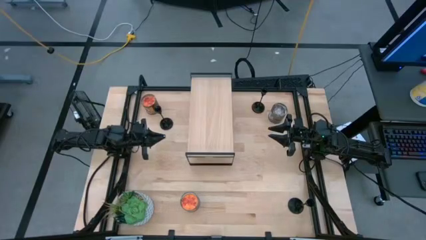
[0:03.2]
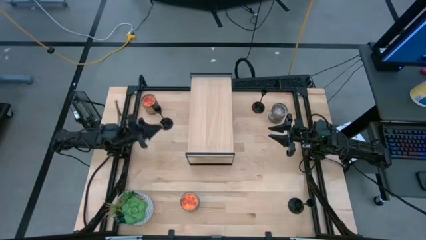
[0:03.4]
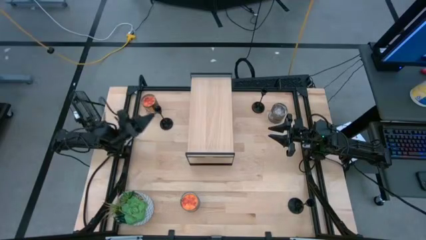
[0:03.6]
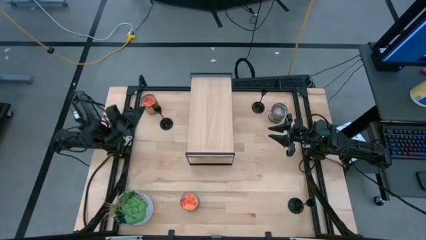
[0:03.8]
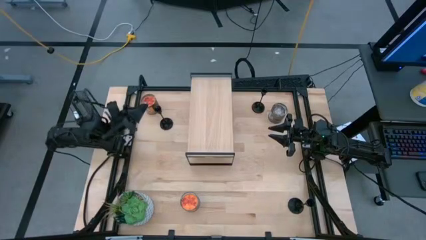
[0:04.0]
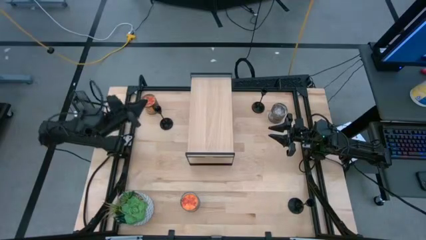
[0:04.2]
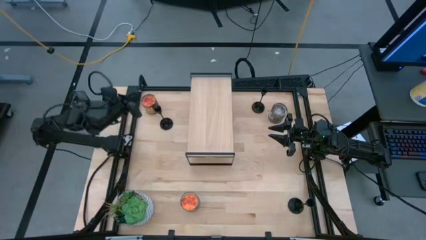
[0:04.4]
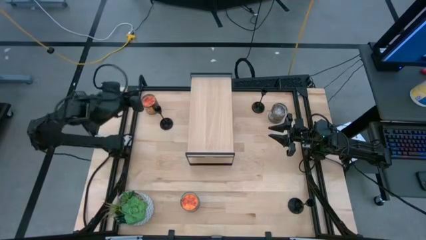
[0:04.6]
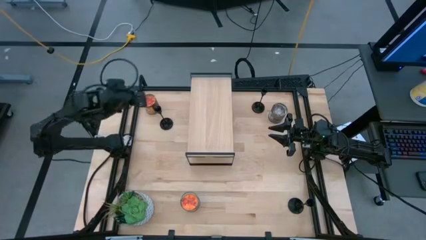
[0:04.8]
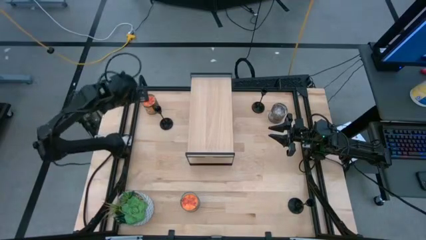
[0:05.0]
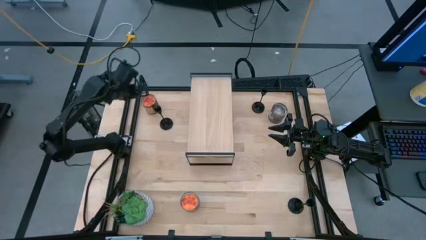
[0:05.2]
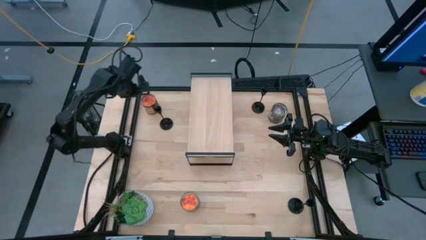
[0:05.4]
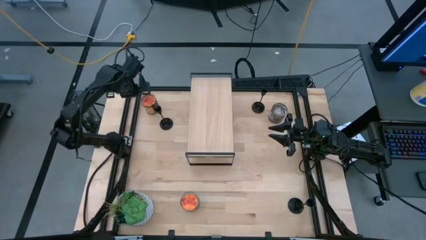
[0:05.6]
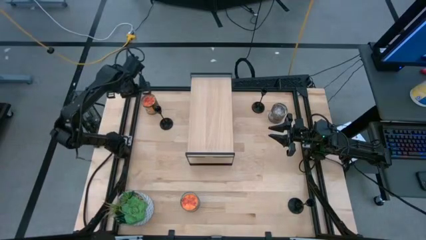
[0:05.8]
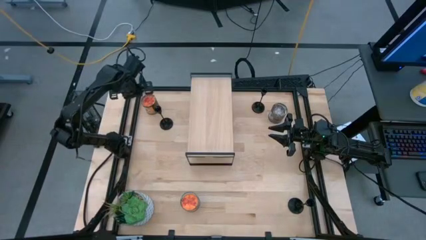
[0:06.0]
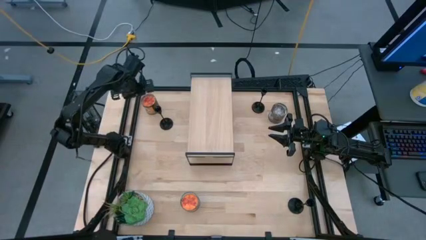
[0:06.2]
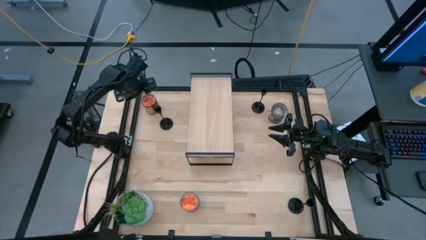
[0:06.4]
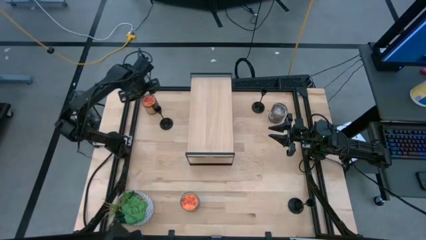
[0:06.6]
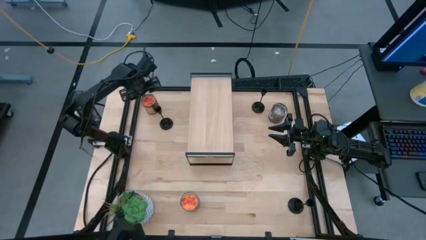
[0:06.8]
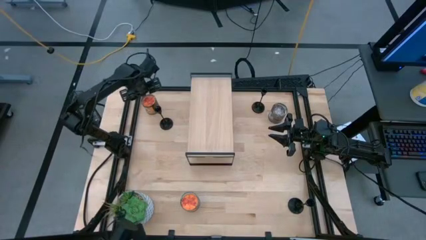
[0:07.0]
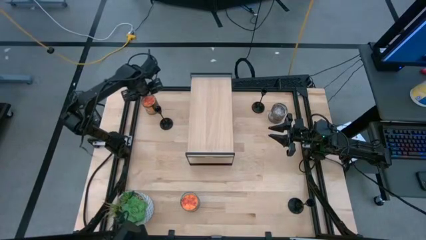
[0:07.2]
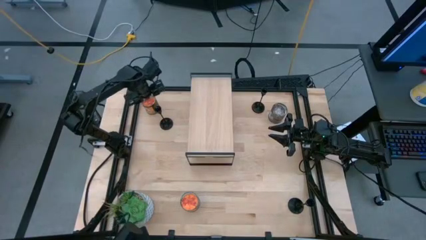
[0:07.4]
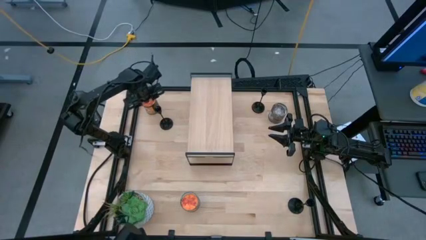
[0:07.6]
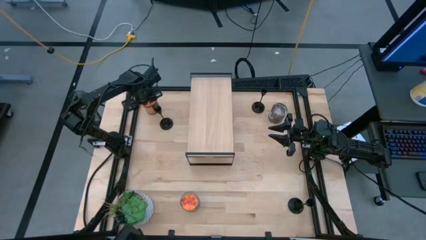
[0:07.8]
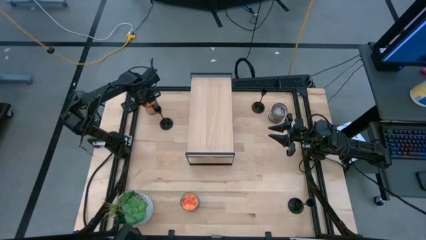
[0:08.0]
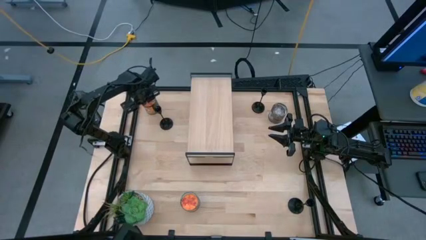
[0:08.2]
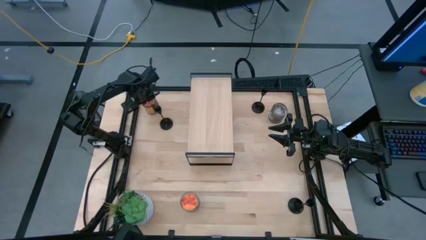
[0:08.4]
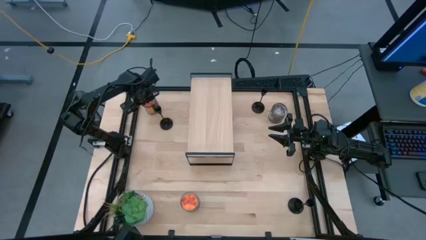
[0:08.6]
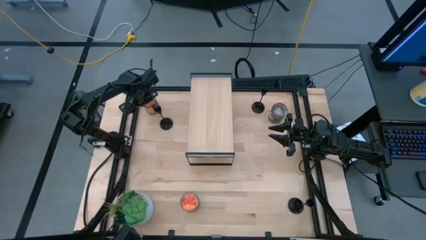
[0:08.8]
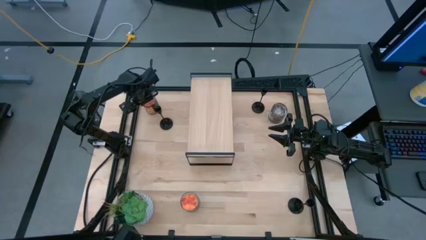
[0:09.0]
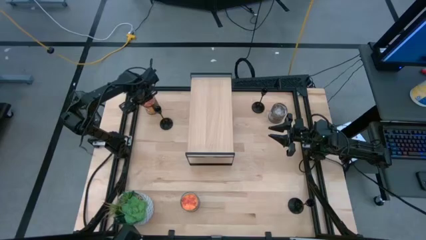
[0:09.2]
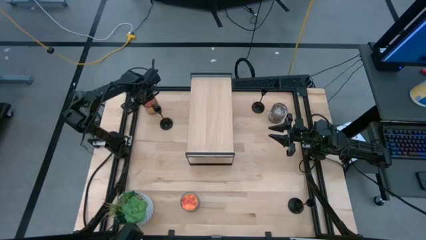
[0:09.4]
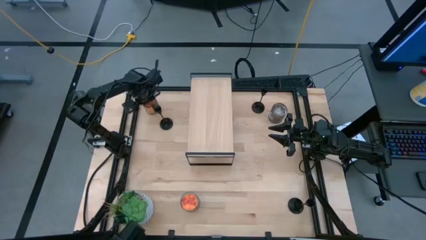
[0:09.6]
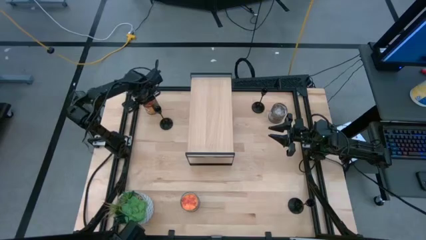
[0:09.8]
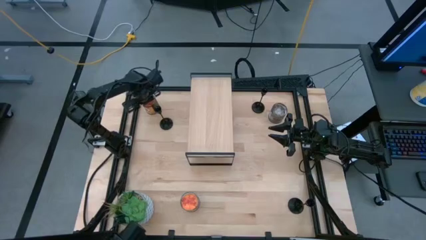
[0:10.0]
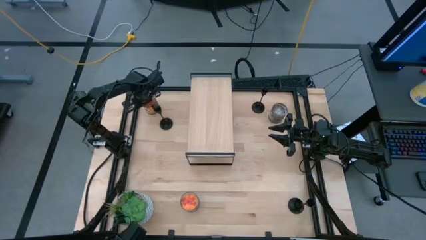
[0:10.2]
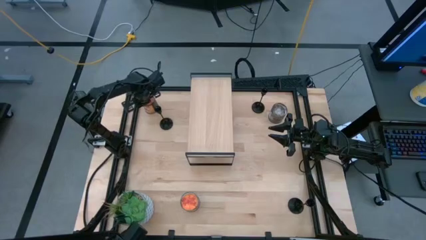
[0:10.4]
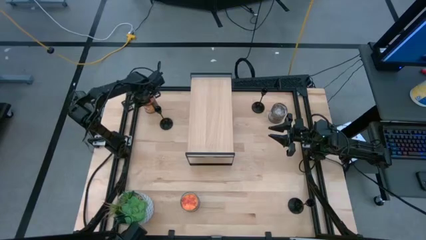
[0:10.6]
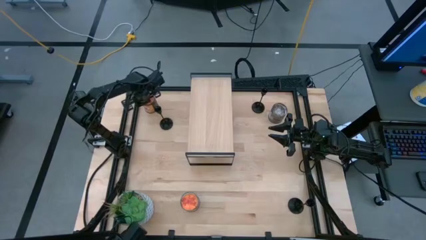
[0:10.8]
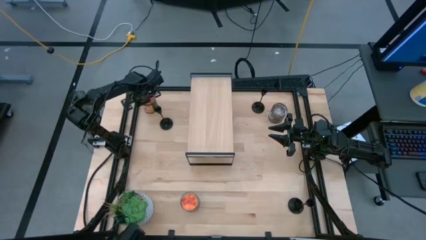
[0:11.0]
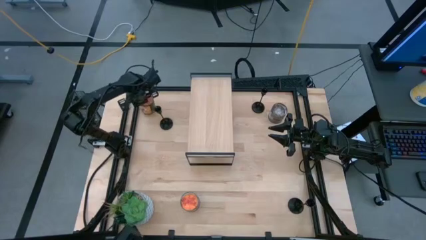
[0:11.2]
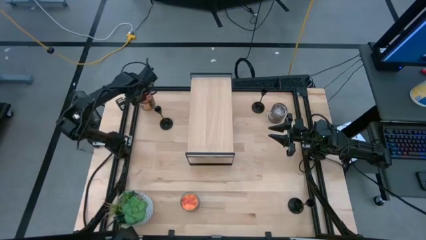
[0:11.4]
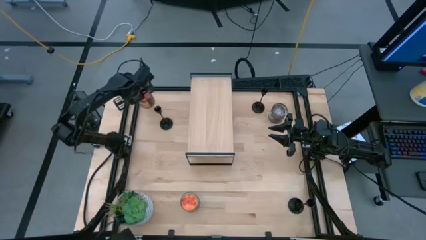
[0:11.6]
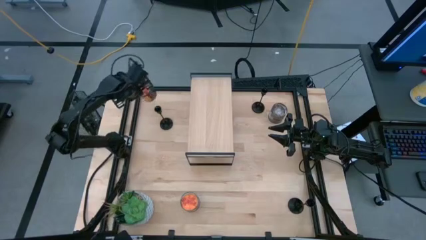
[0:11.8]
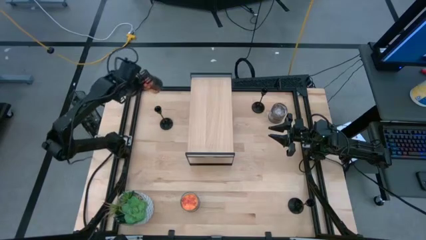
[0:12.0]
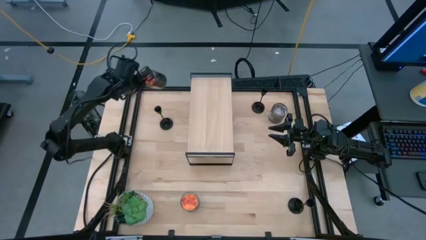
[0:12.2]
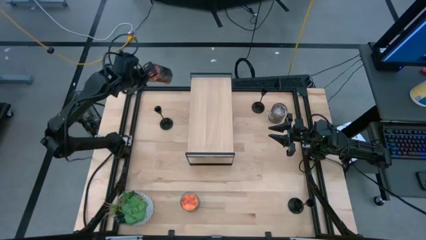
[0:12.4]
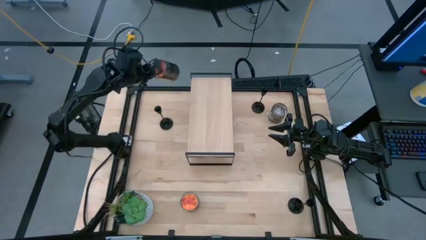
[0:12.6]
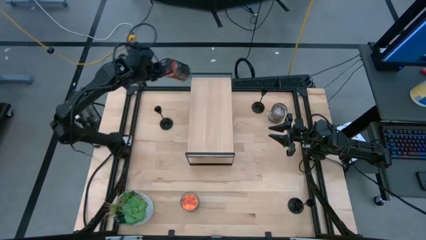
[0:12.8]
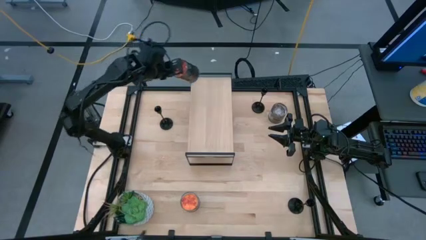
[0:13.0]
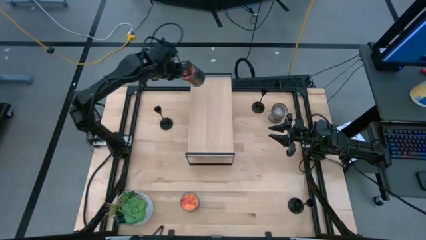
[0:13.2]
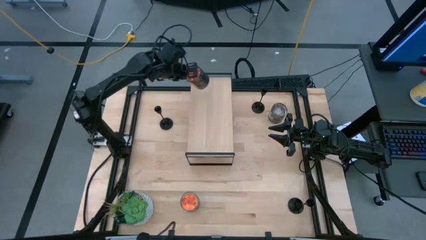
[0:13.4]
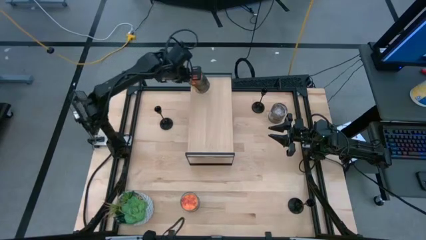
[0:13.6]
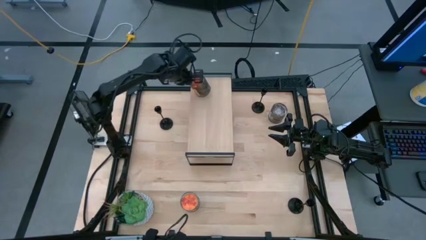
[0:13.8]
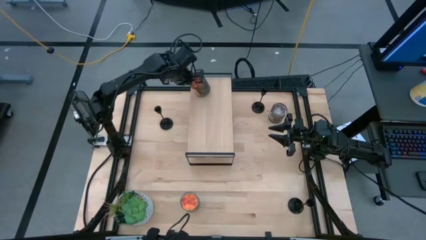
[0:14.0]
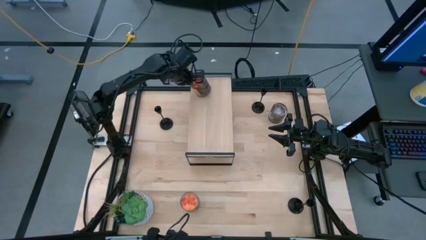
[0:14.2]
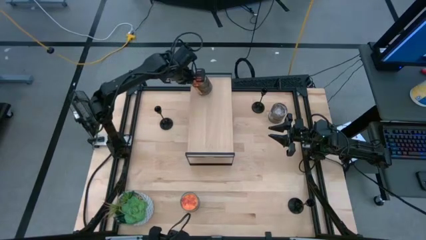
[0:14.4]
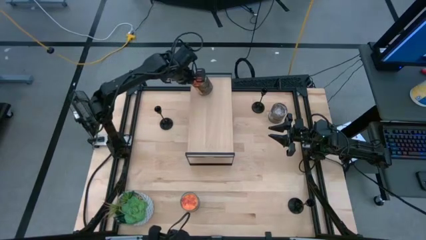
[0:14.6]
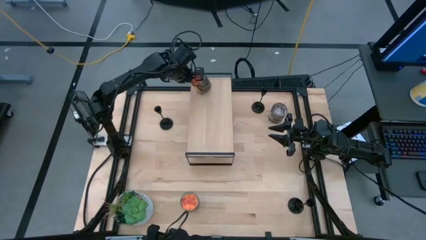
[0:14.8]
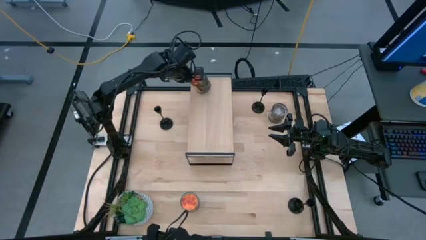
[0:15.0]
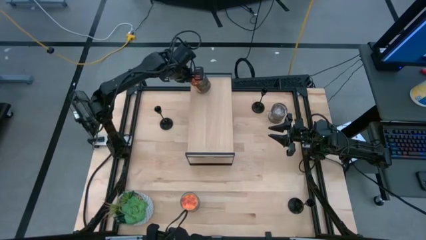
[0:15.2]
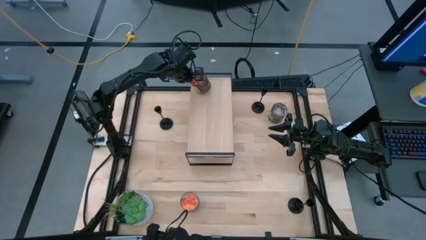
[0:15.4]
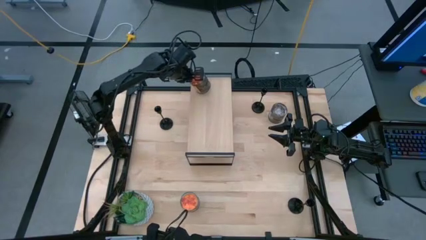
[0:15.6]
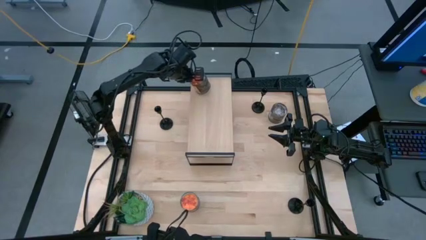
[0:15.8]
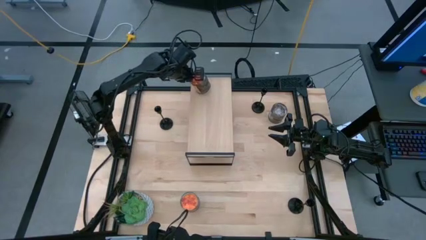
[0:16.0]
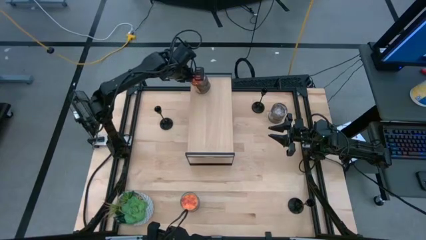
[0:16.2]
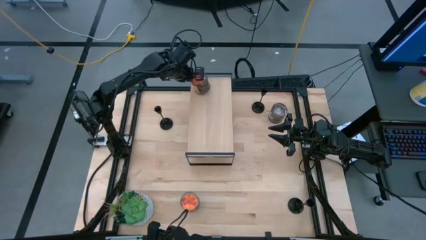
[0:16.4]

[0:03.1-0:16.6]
Task: Pick & Place candle stick holders
Put the top orange scented candle on the shelf

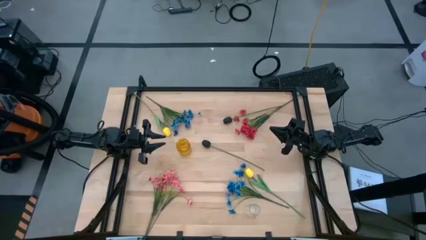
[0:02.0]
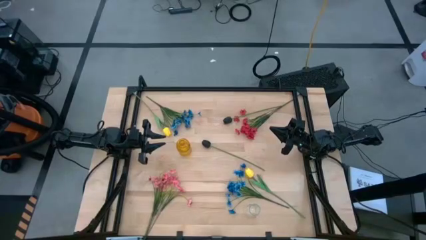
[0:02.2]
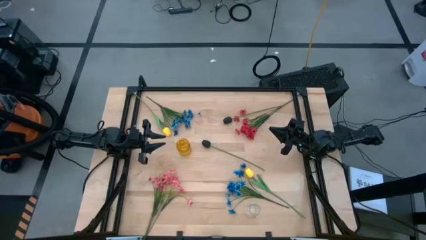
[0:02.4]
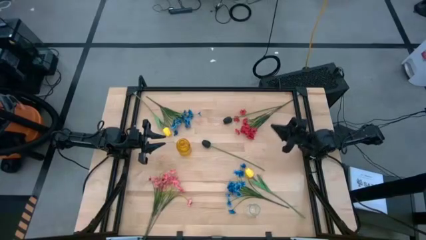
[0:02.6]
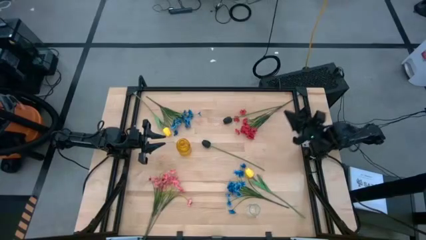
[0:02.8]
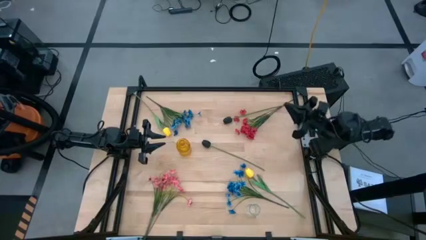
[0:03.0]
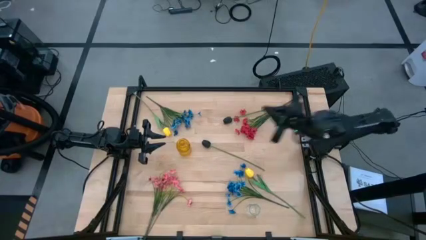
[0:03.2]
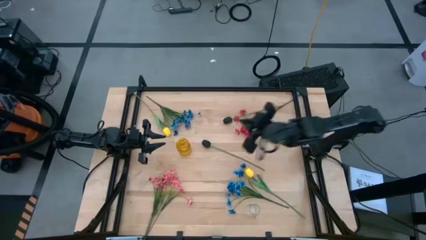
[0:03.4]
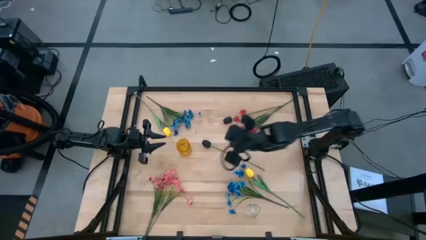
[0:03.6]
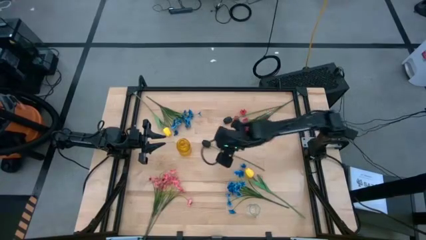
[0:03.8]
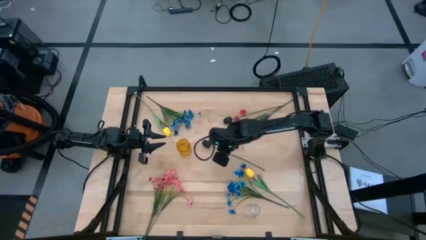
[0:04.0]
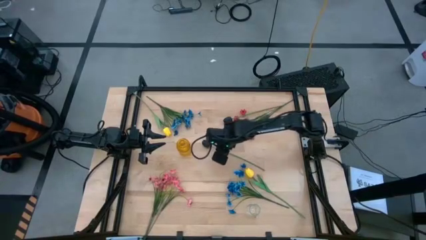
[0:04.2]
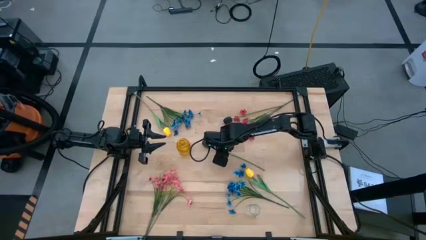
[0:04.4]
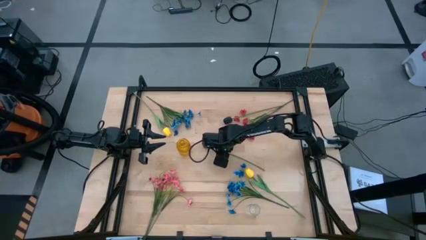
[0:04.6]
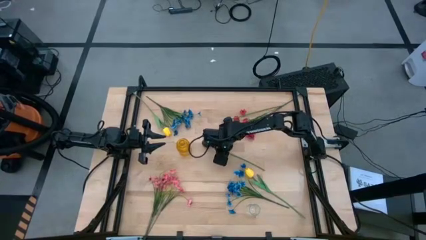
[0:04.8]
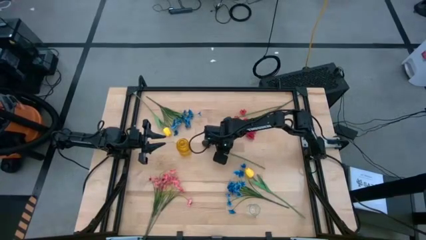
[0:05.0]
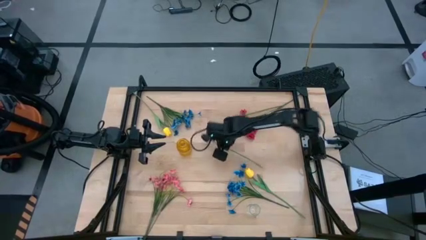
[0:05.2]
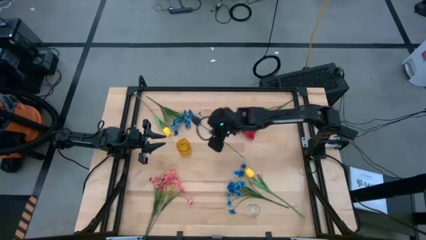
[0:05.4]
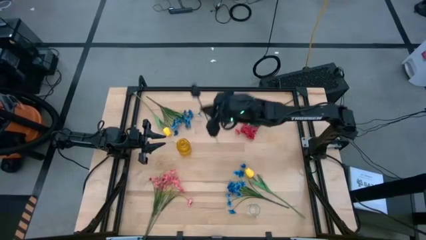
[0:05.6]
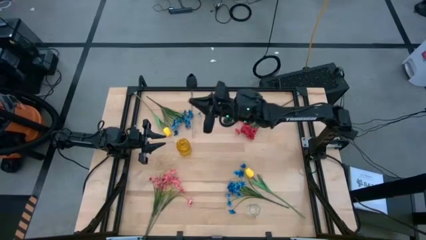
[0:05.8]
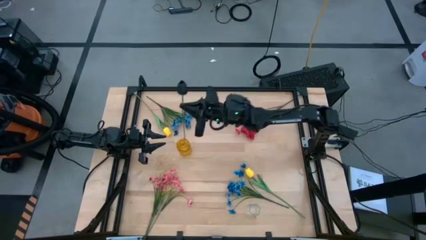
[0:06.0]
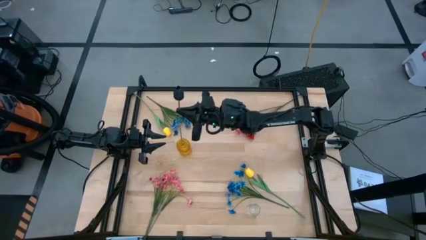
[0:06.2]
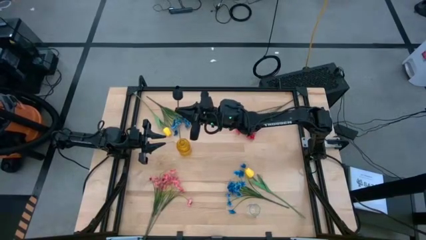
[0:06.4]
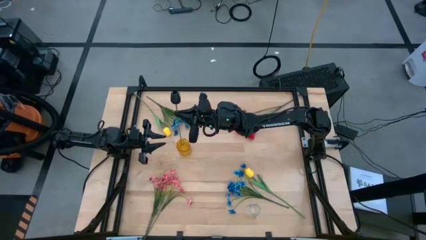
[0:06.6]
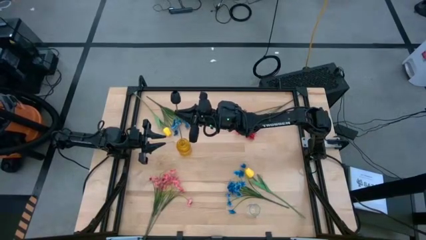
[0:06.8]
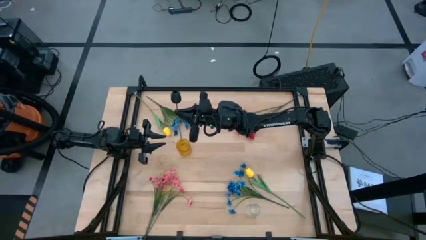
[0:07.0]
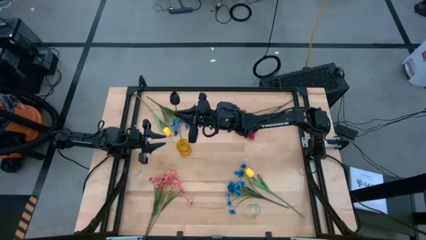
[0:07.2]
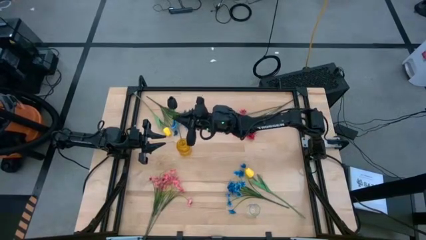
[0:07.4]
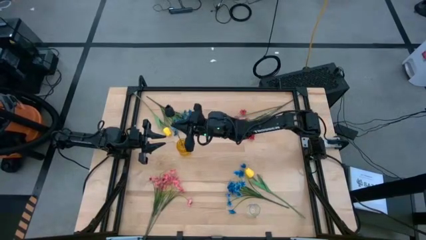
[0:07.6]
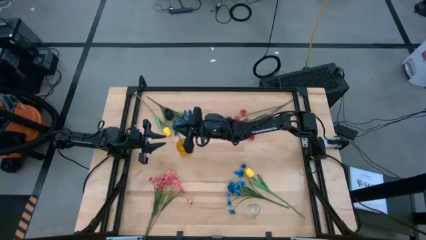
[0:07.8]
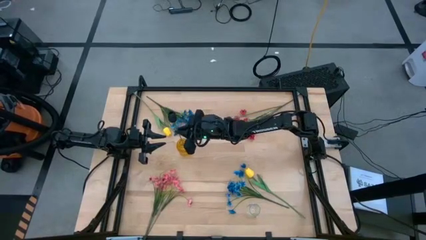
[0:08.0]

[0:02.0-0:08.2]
Task: Sort flowers into vase by color
Put the bottom black flower into the yellow vase
